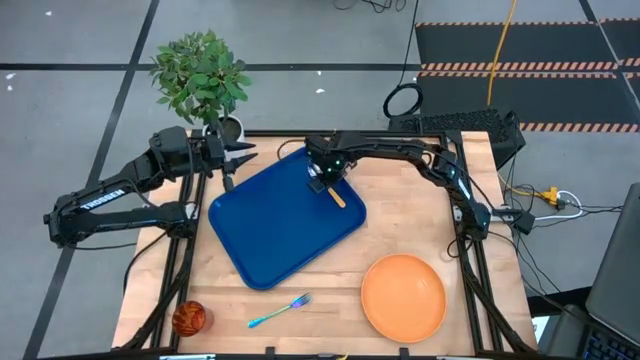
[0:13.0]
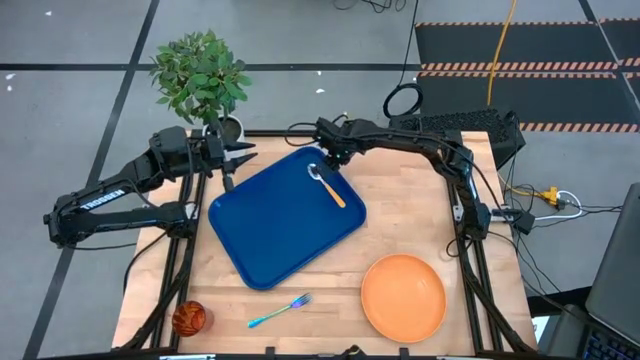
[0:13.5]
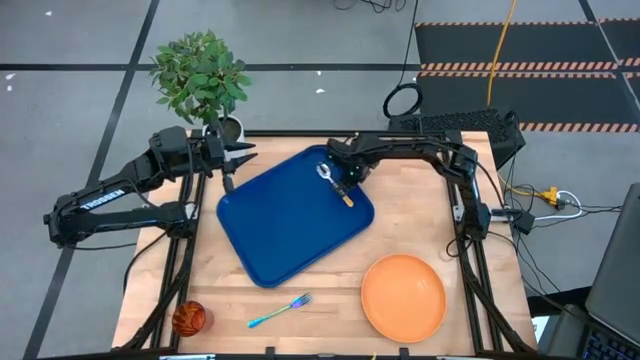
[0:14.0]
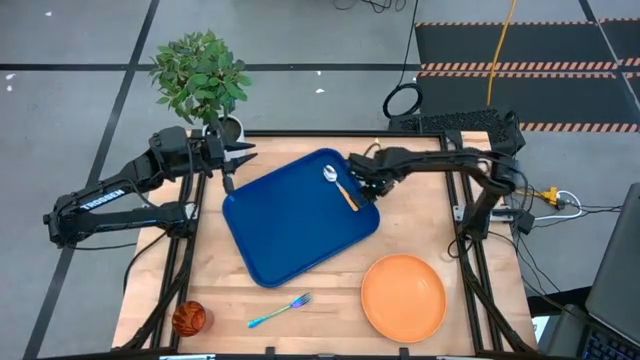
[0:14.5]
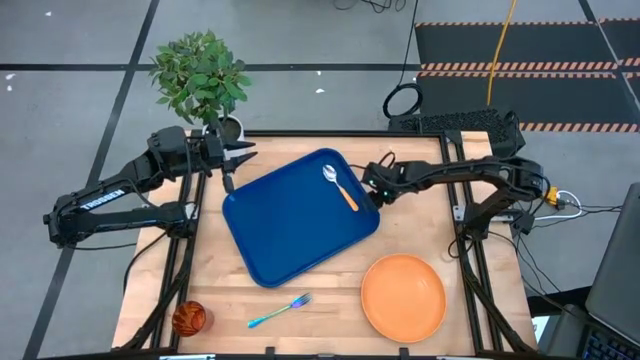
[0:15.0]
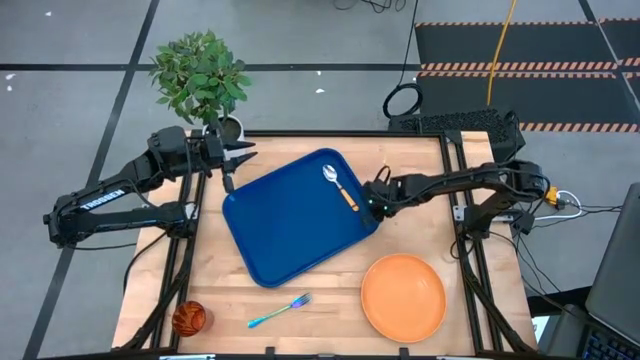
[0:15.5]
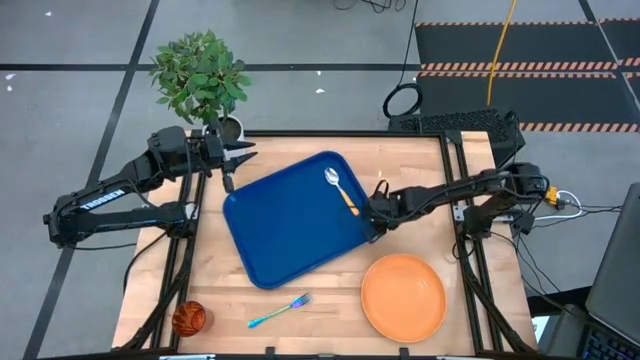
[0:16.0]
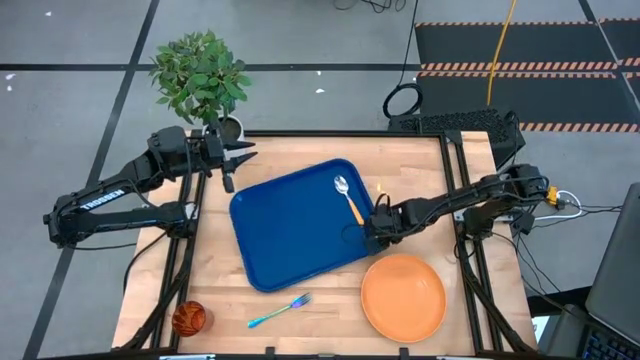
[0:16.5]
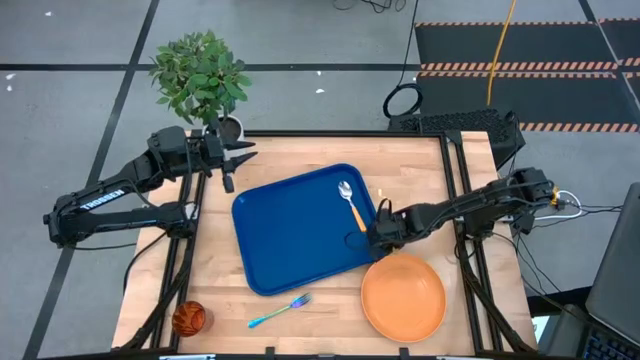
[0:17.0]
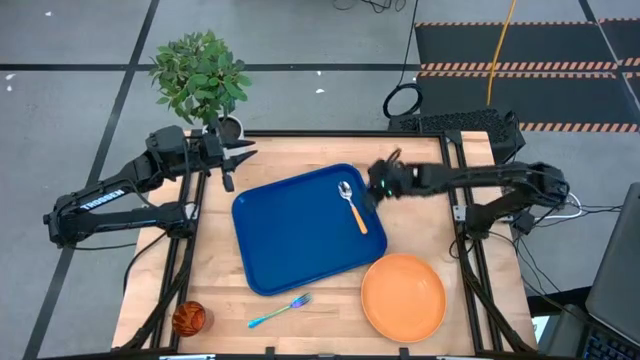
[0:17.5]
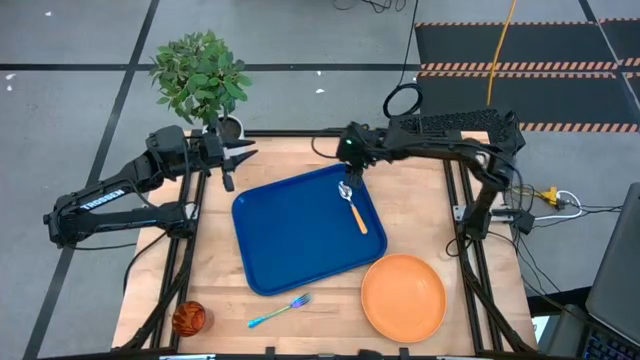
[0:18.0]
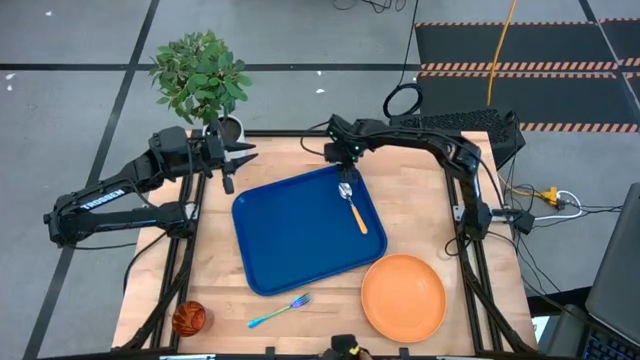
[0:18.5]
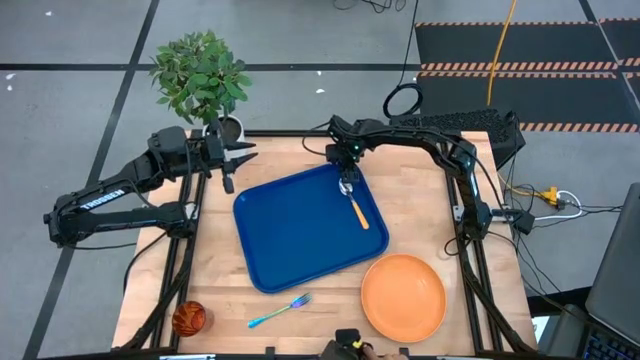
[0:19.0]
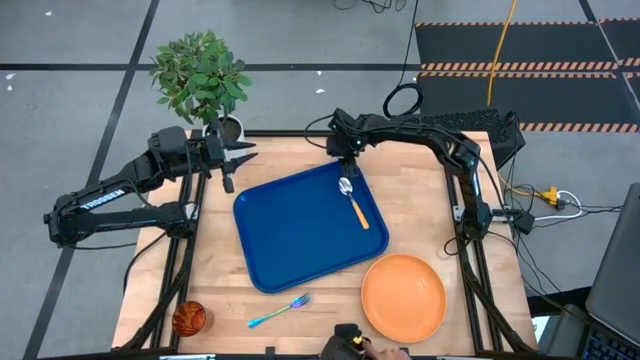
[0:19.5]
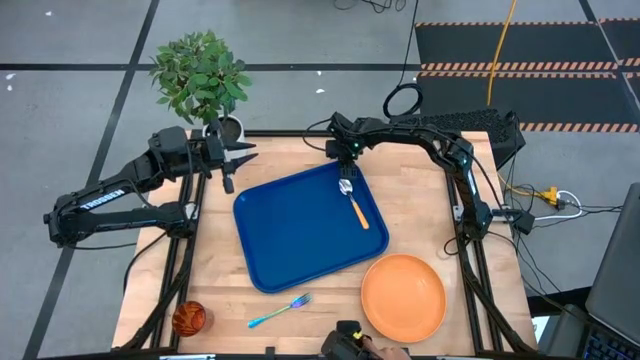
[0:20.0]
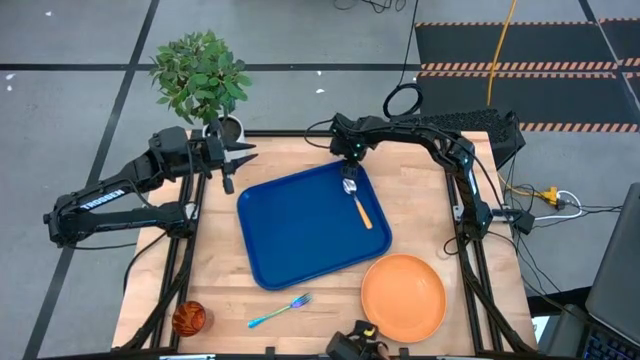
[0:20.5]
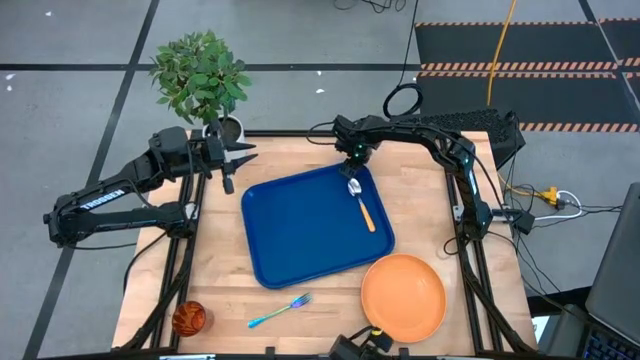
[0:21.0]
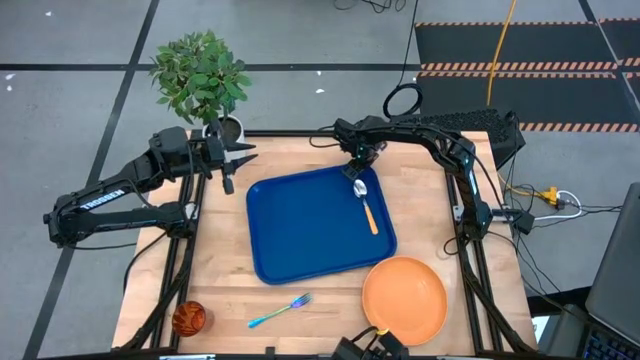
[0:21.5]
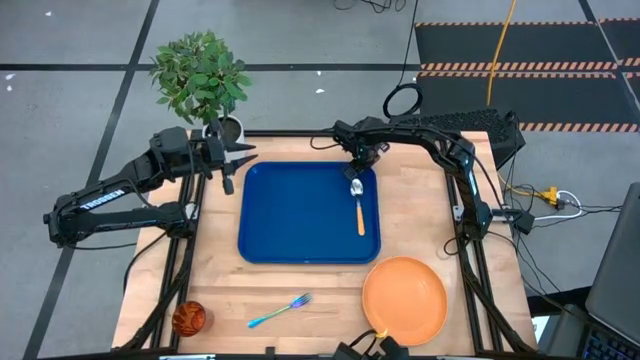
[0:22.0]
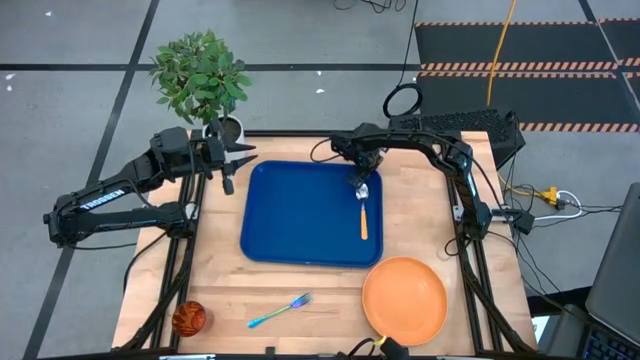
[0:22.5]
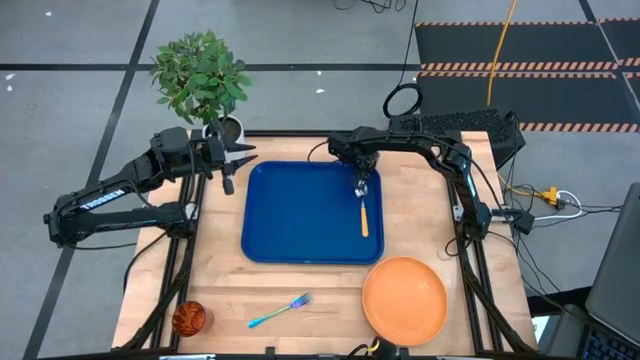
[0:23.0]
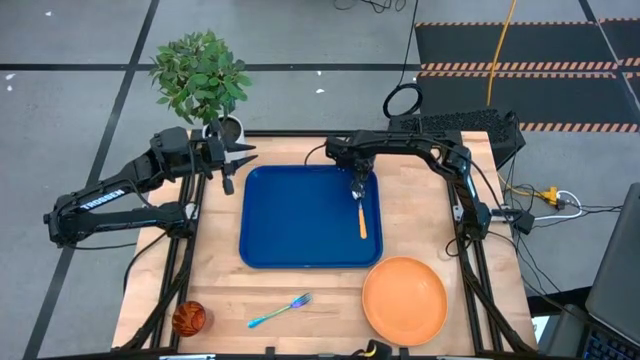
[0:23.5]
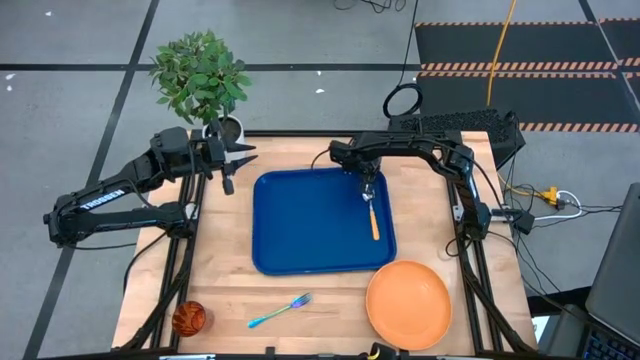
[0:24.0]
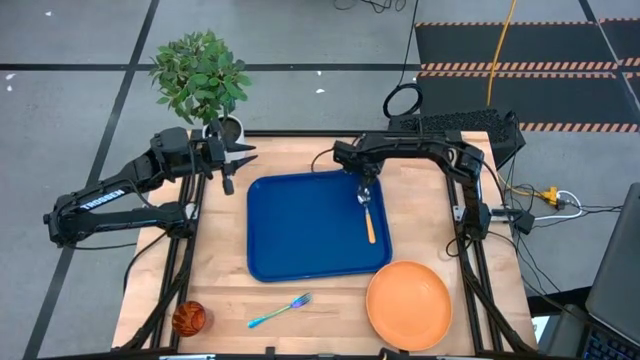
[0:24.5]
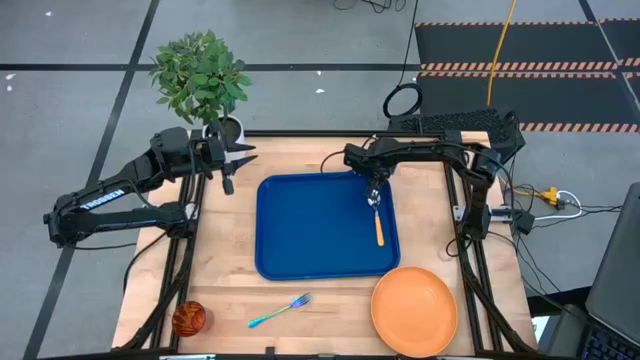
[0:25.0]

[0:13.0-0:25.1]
Task: Pick and place plate/cup/fork/spoon on tray
Adjust the serving tray

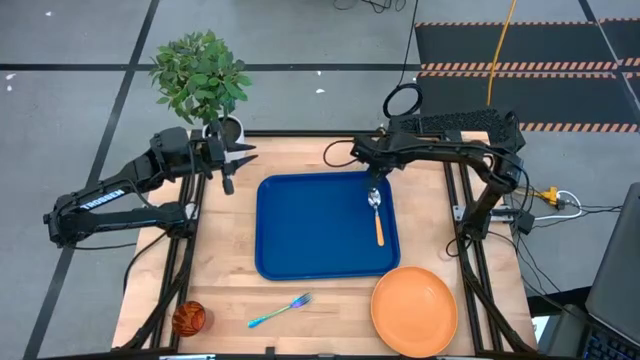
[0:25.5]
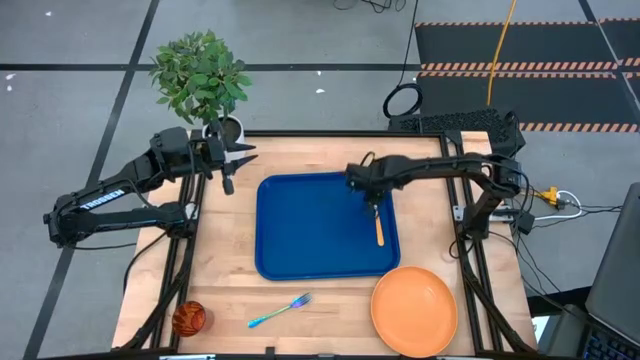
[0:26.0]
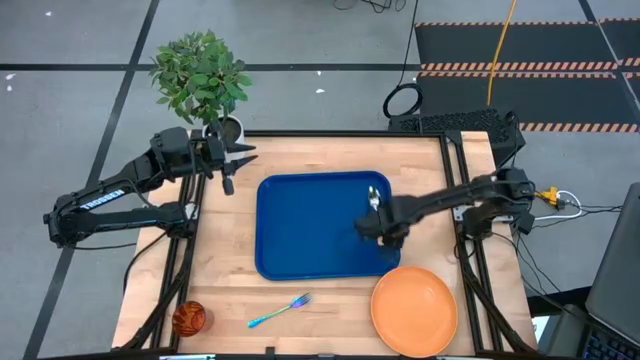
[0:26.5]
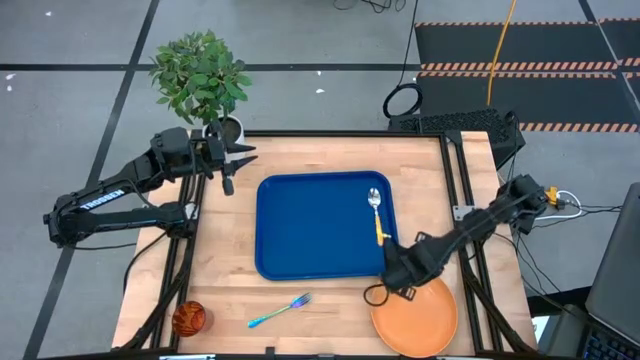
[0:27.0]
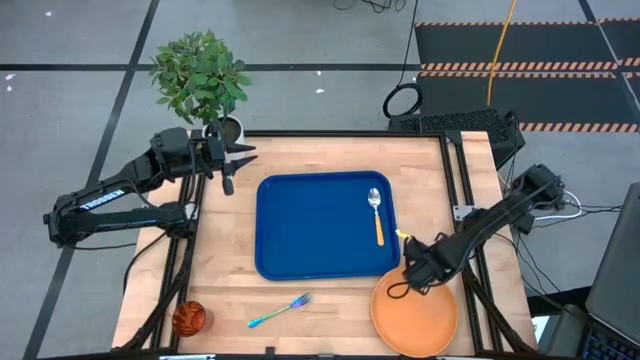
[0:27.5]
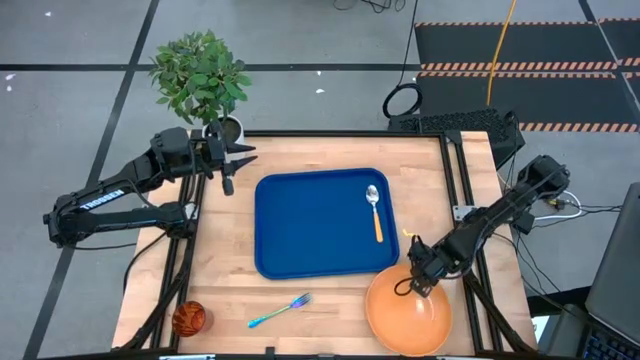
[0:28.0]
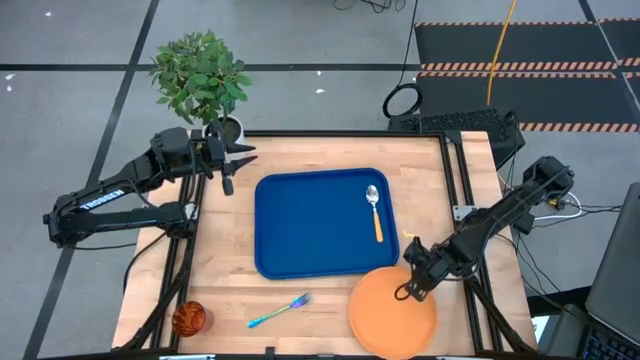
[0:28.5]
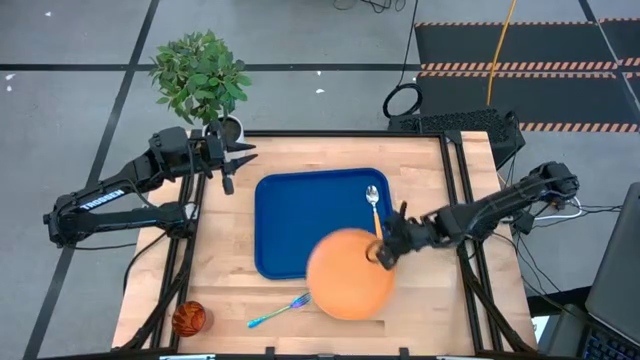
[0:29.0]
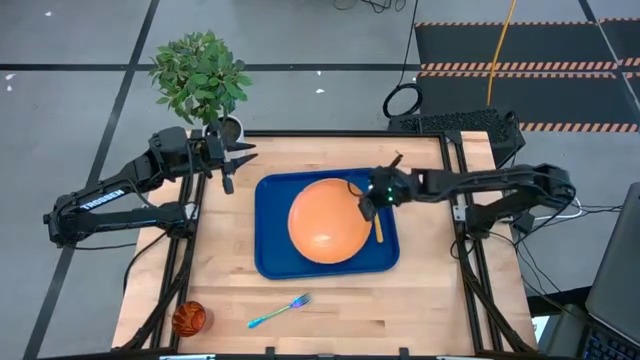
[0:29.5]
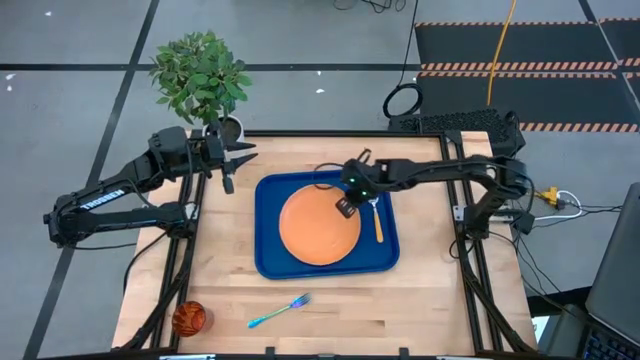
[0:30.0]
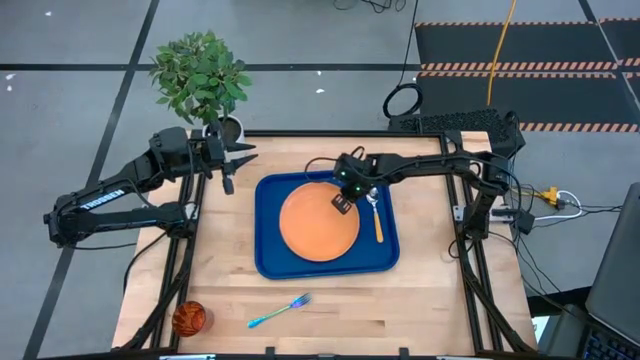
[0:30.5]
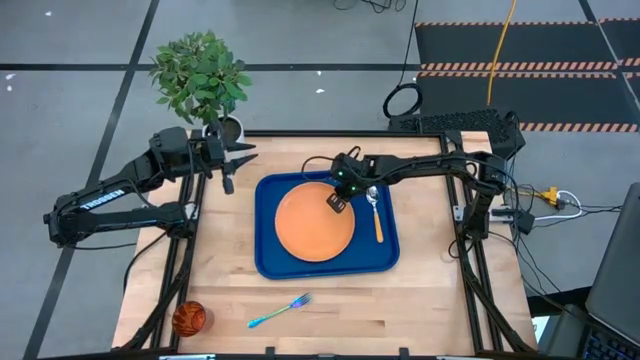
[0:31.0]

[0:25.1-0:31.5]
Put the plate on the serving tray to the left of the spoon

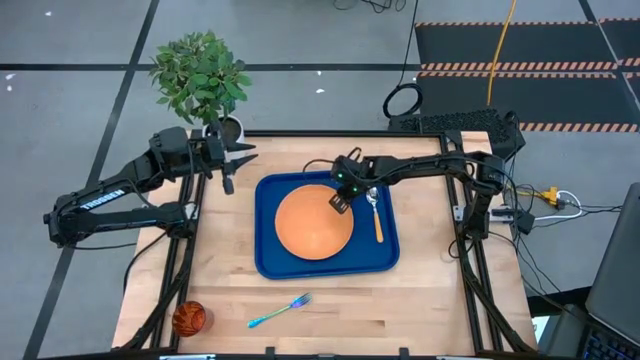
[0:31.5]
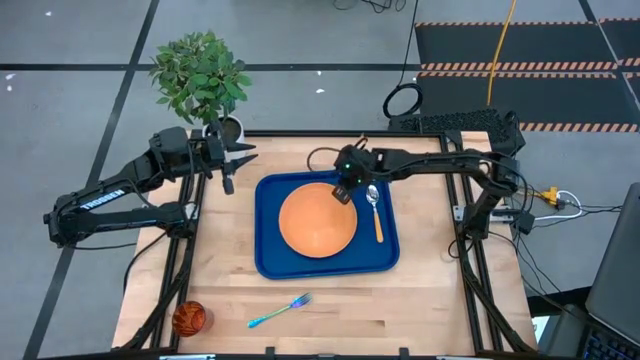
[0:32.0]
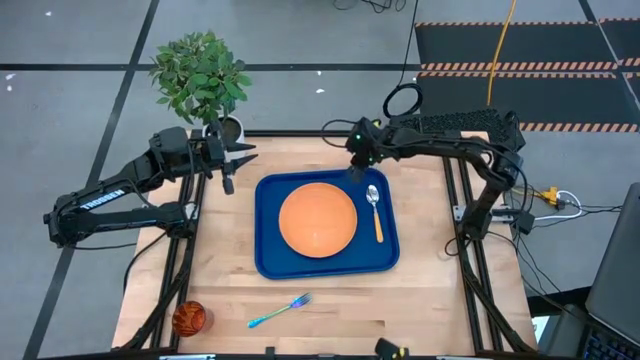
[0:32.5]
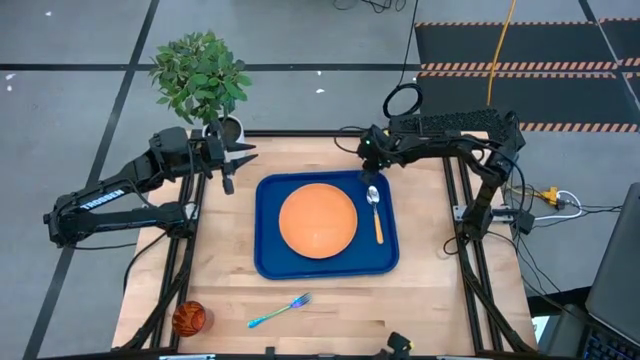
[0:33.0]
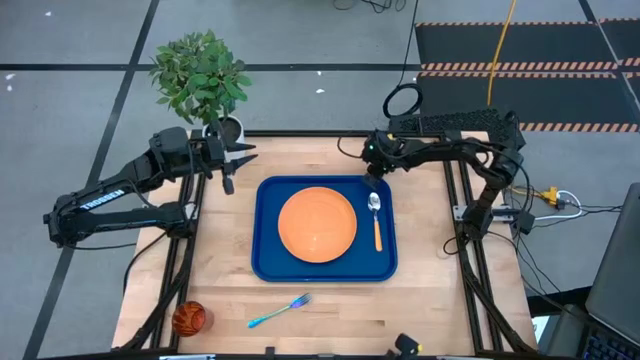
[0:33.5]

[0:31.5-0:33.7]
Adjust the serving tray
